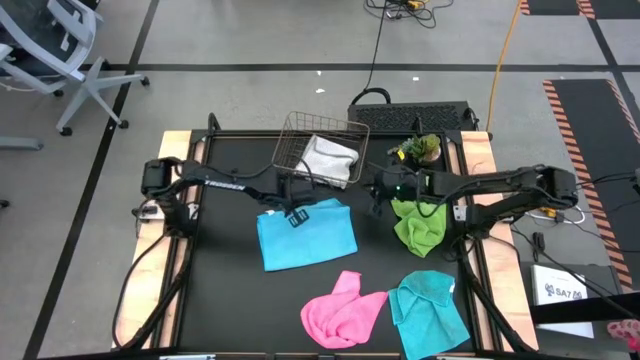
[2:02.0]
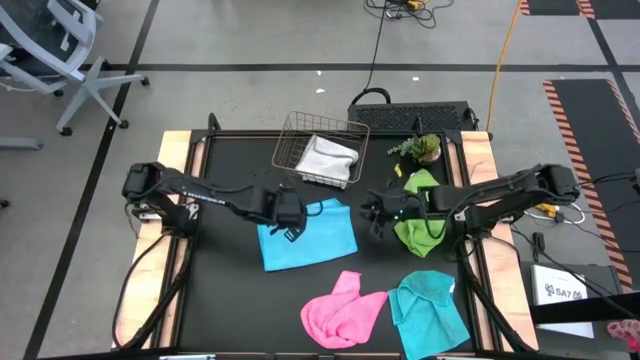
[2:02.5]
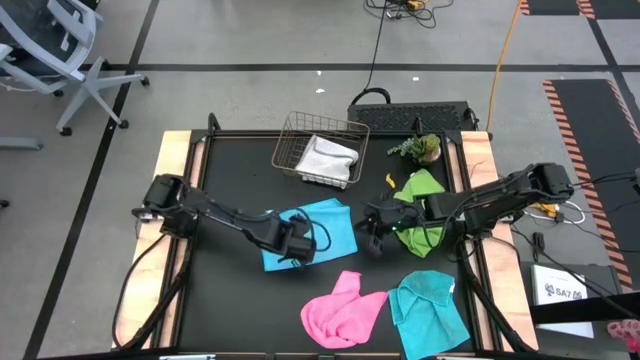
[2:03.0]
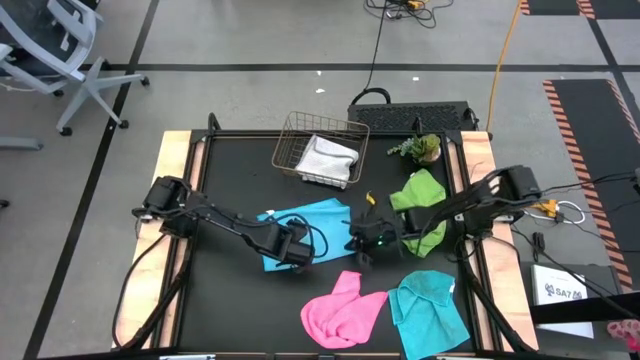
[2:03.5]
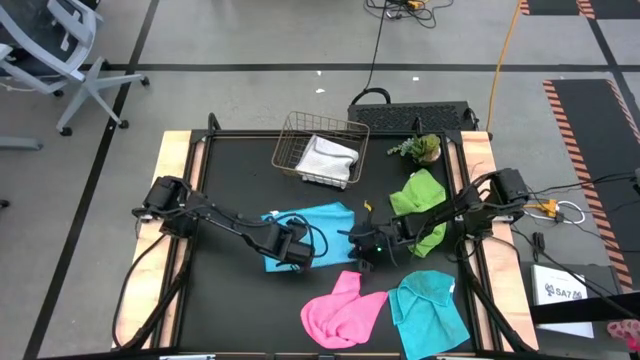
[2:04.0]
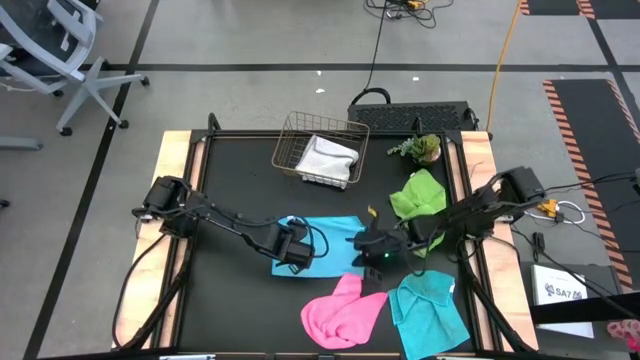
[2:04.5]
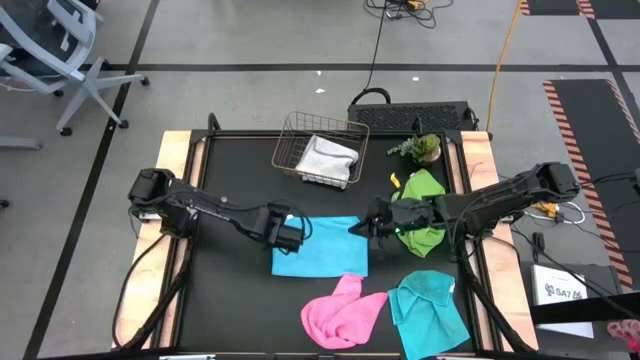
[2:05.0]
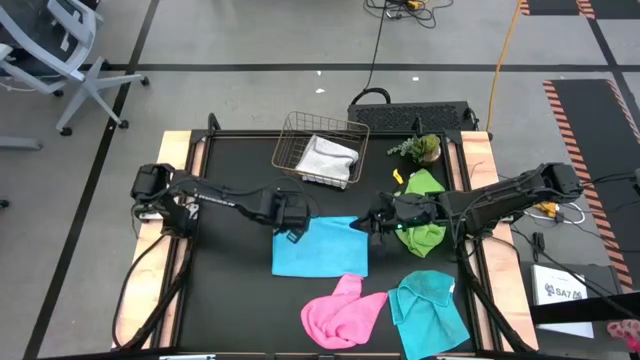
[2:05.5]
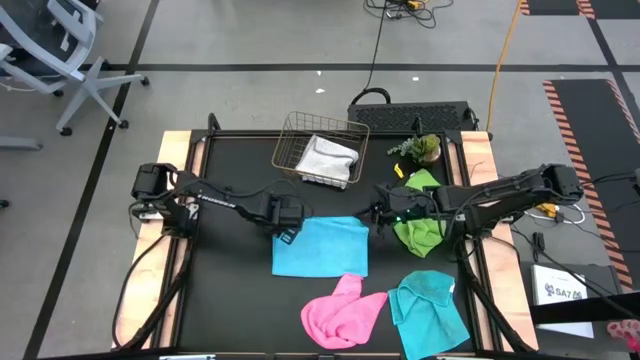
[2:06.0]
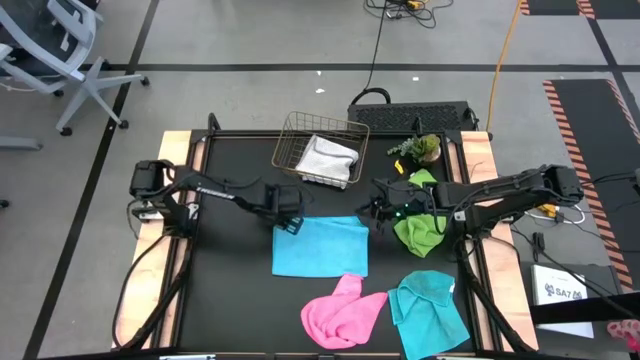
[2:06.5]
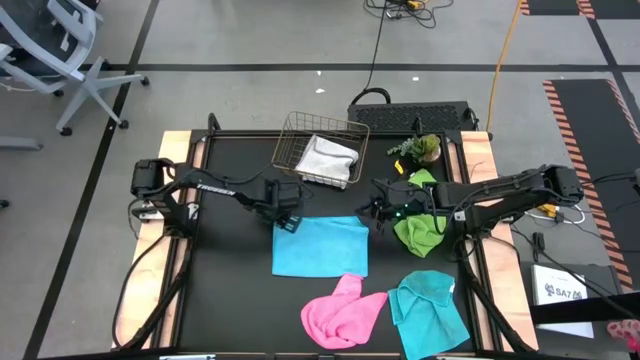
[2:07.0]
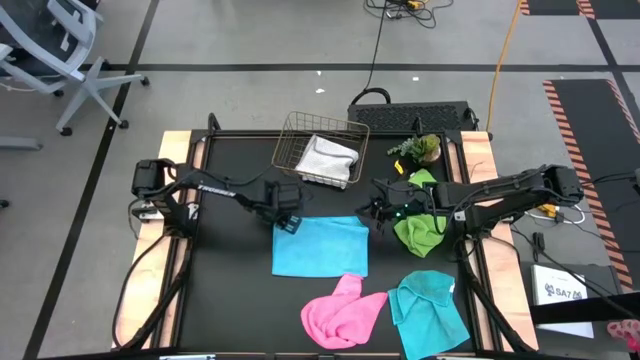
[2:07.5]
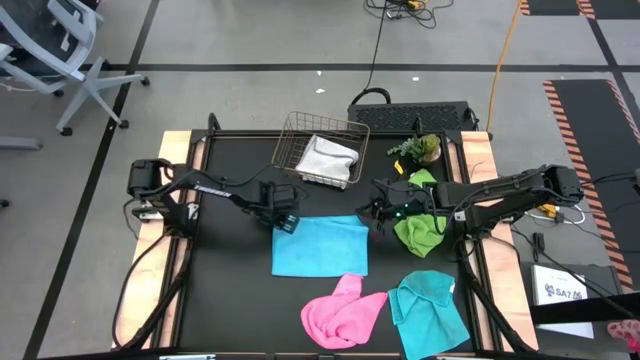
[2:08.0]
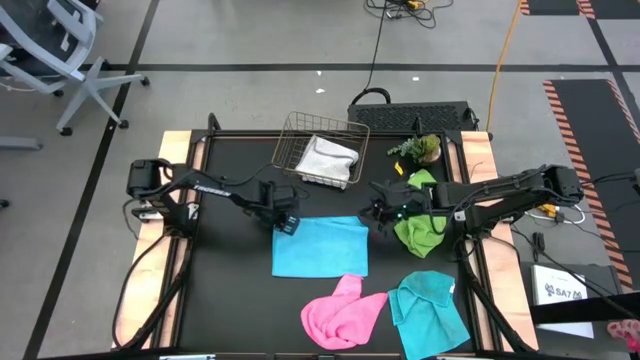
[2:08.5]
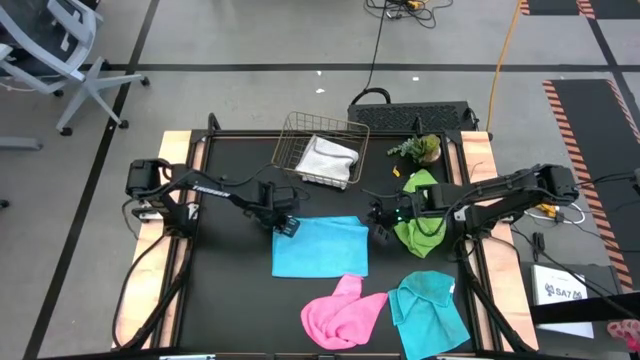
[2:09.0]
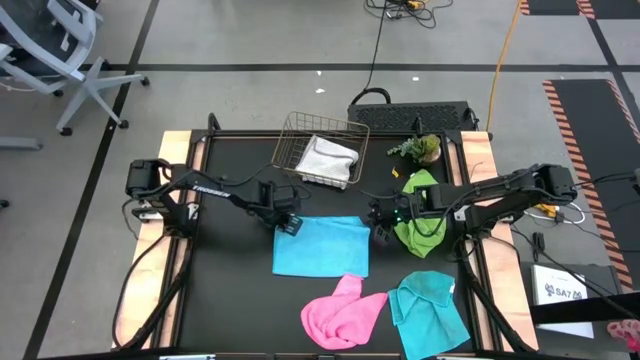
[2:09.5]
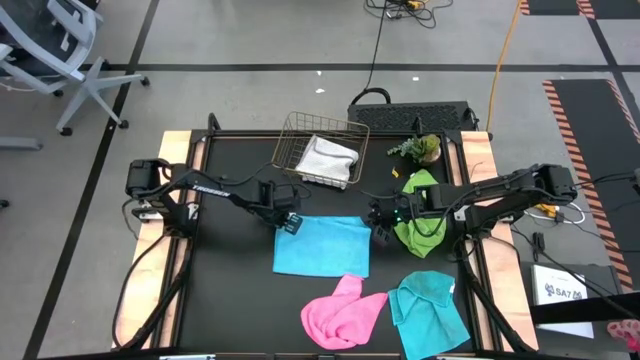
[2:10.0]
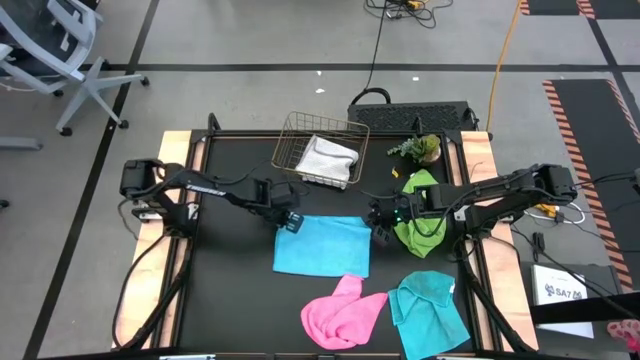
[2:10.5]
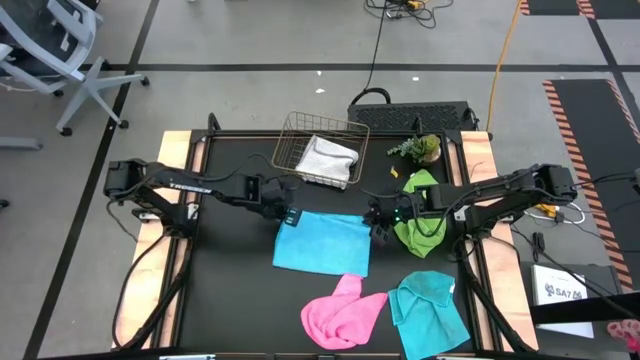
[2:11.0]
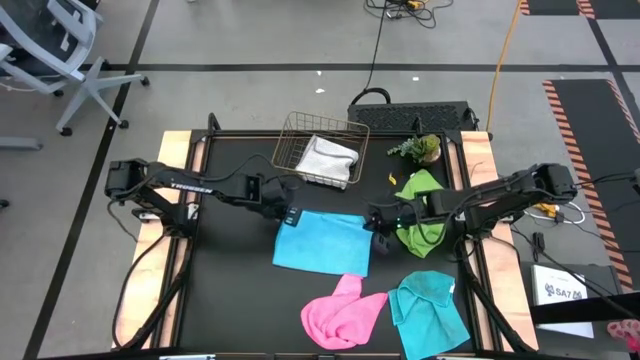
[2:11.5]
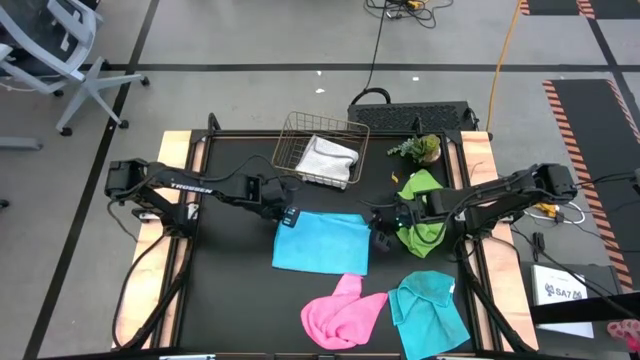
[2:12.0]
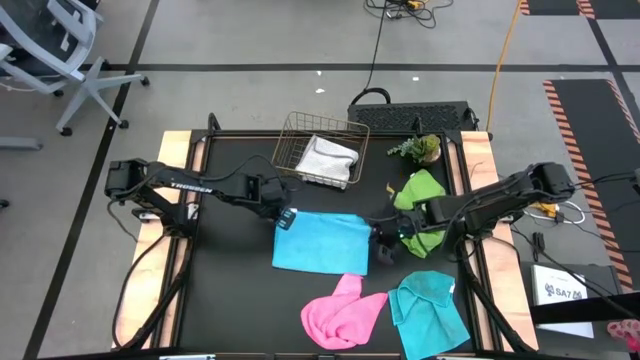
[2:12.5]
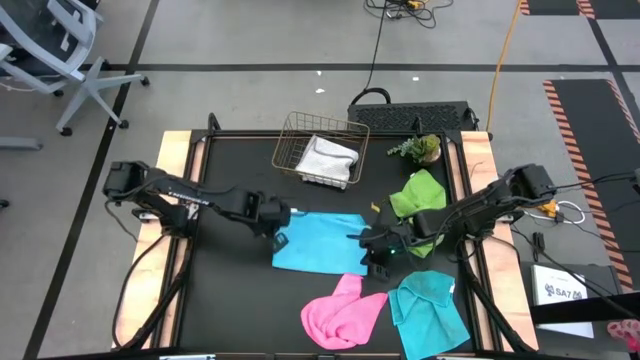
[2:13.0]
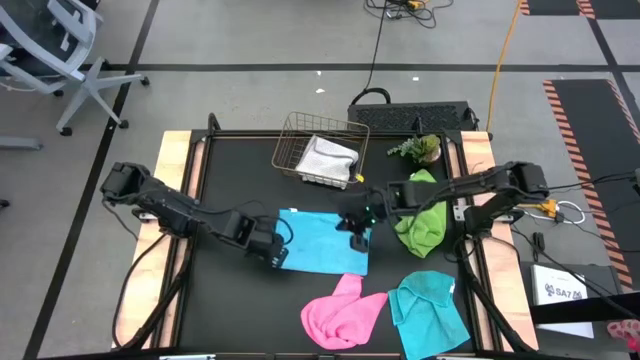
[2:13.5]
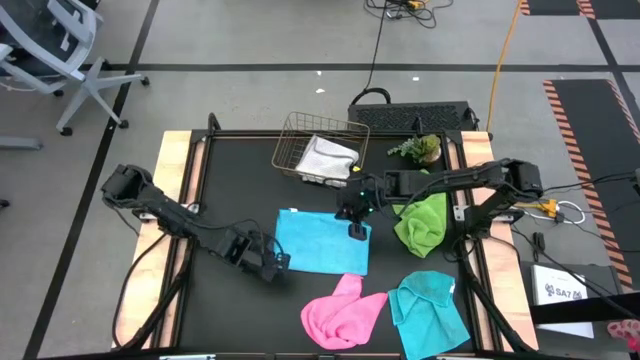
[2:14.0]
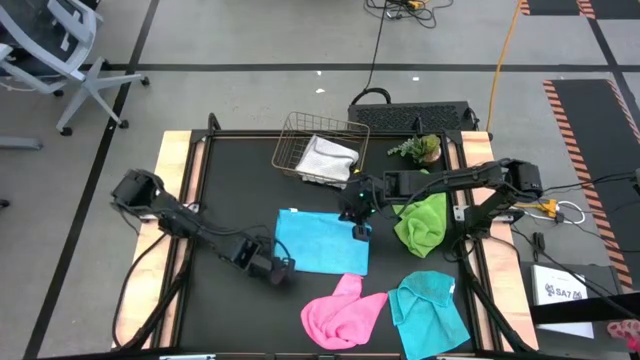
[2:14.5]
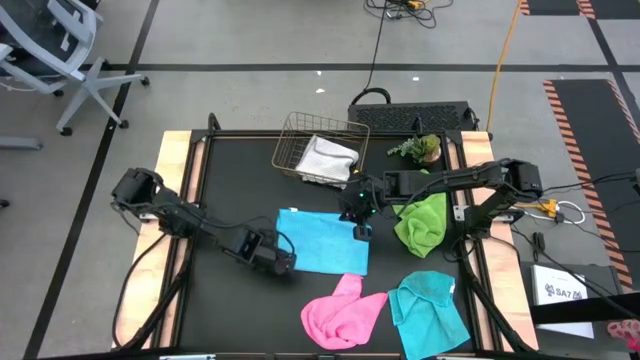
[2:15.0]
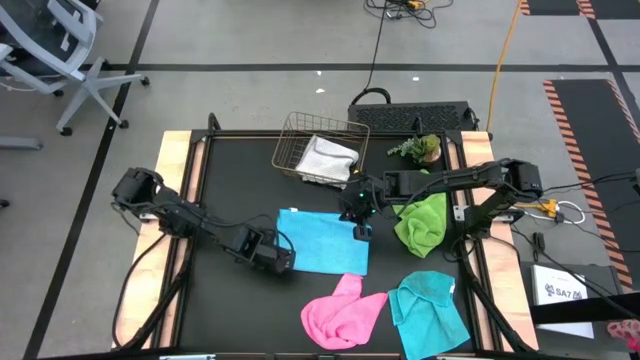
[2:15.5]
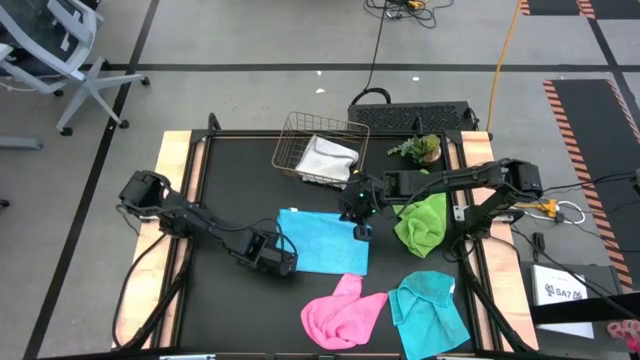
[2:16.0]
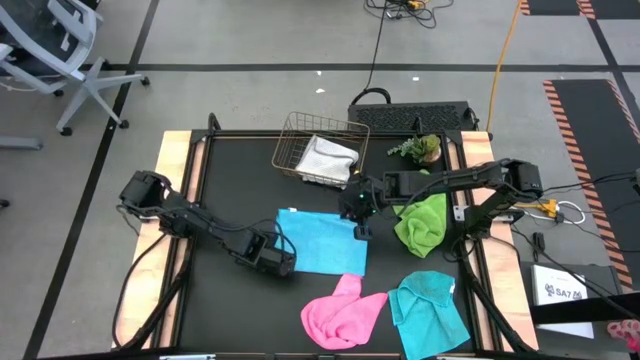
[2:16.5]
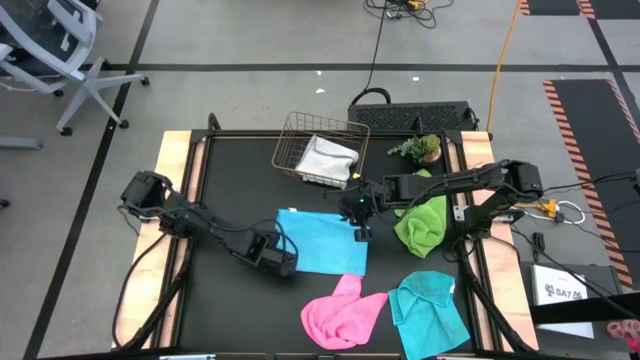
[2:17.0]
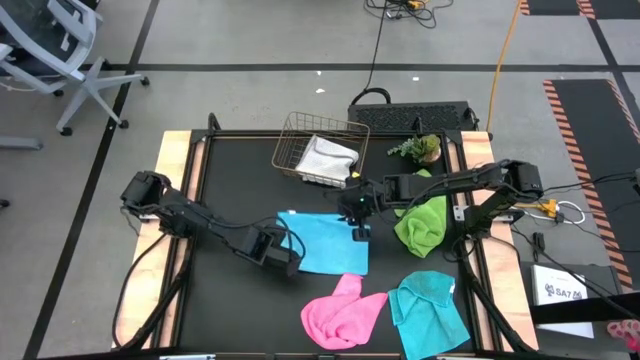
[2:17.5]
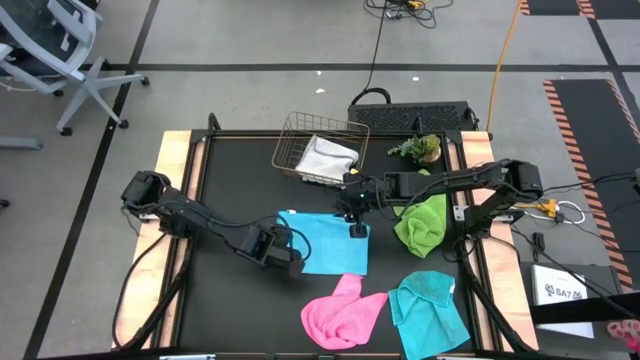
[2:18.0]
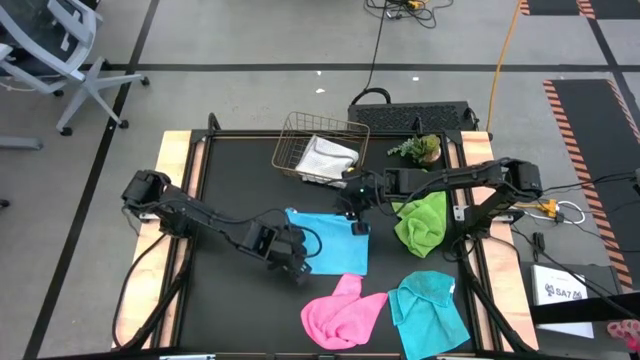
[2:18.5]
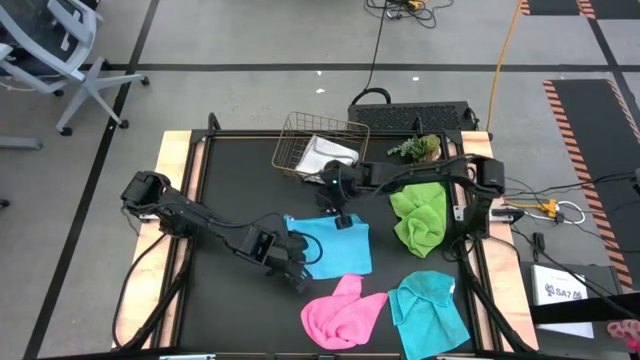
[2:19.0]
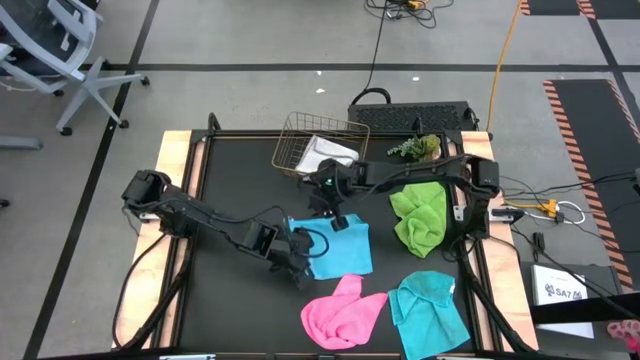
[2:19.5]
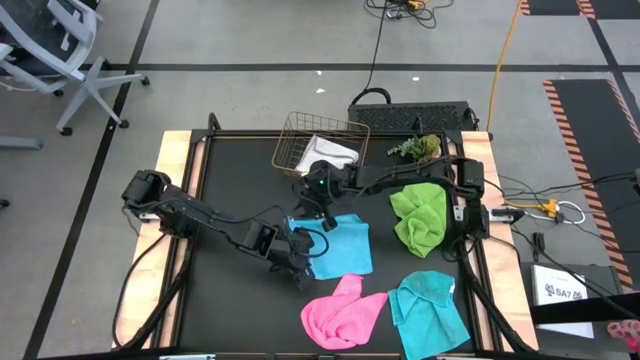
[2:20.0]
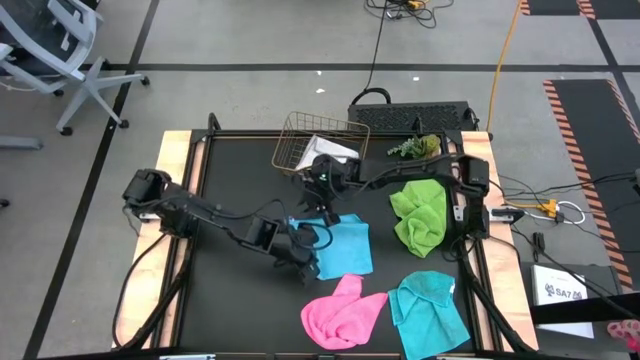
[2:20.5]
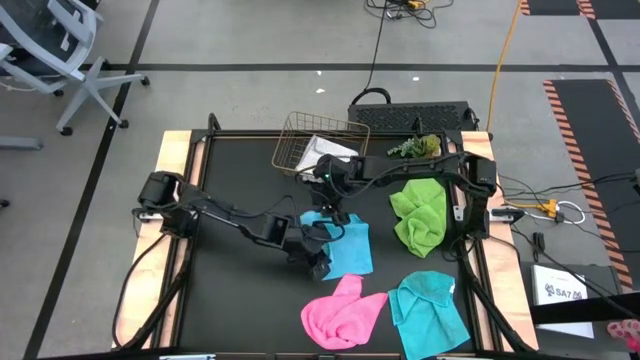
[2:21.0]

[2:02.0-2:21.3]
Task: Fold microfiber towels
Fold the top blue microfiber cloth
